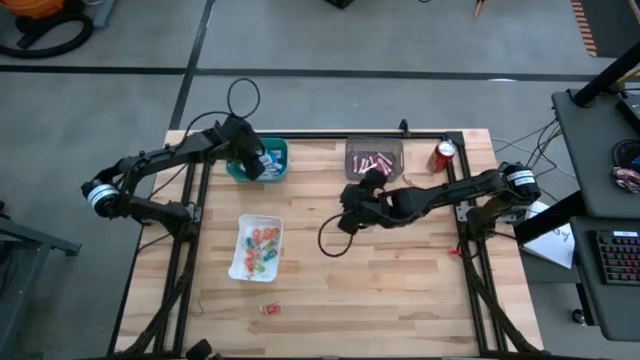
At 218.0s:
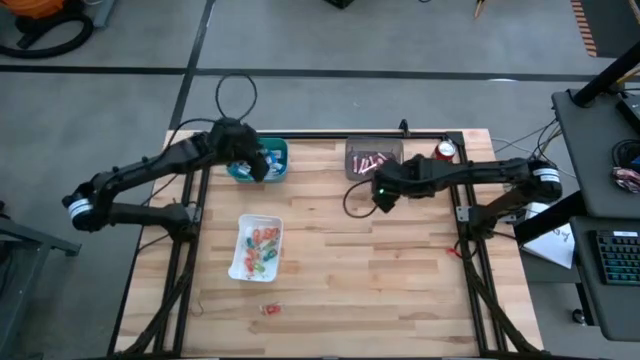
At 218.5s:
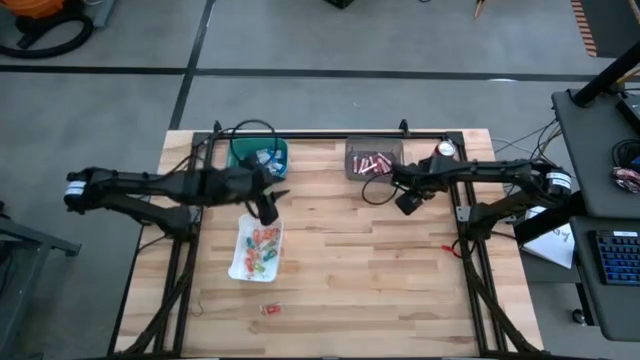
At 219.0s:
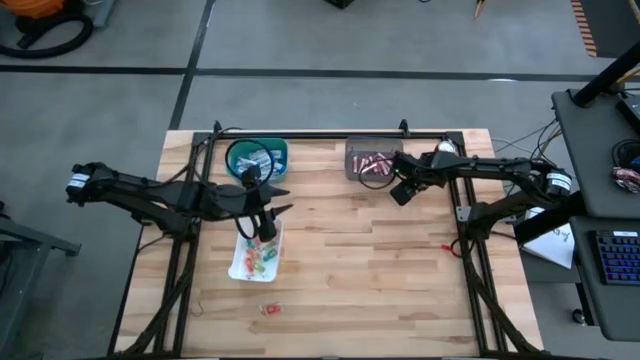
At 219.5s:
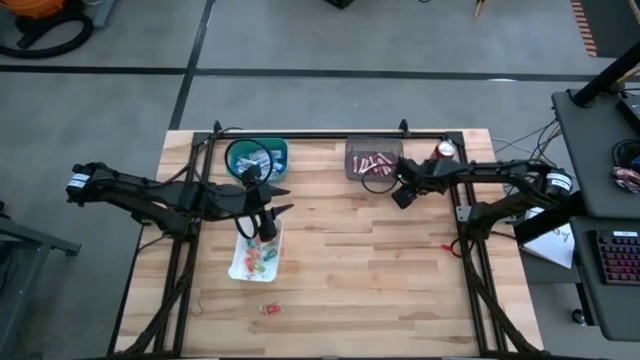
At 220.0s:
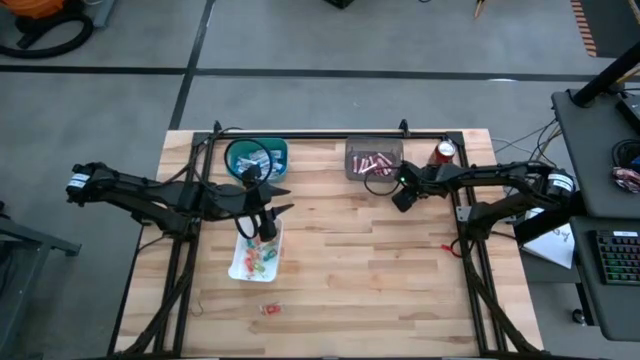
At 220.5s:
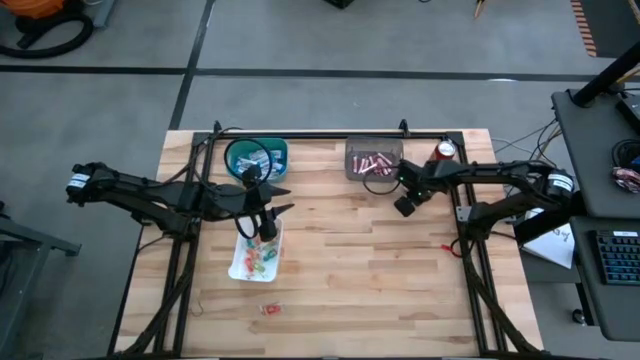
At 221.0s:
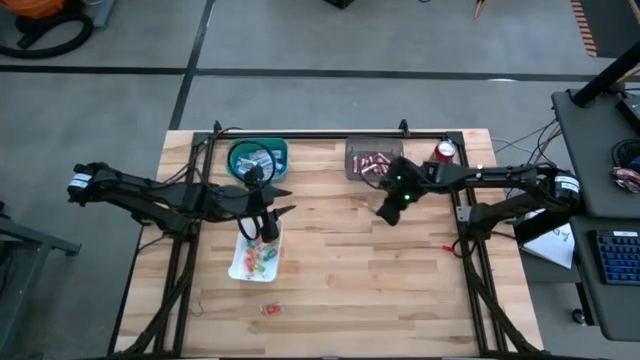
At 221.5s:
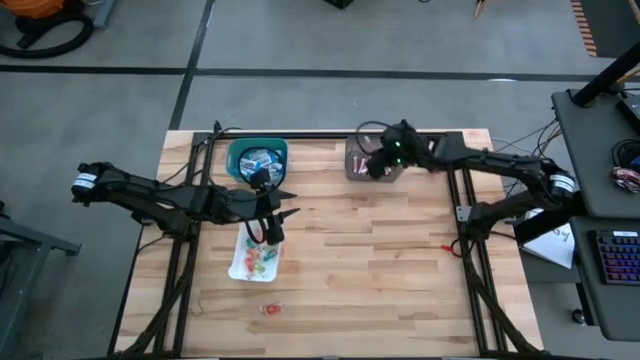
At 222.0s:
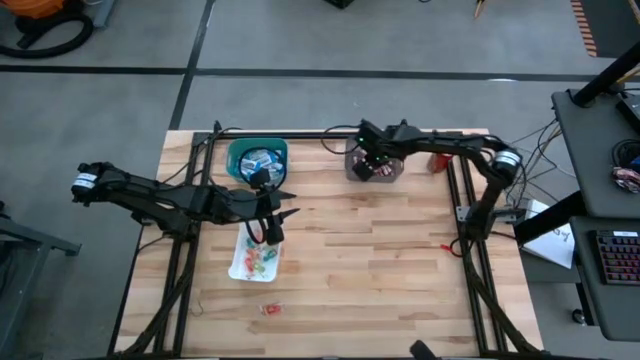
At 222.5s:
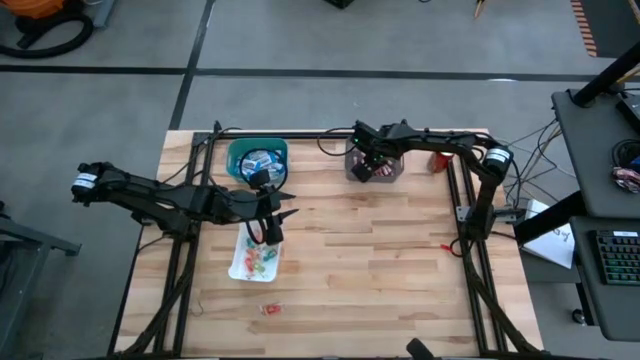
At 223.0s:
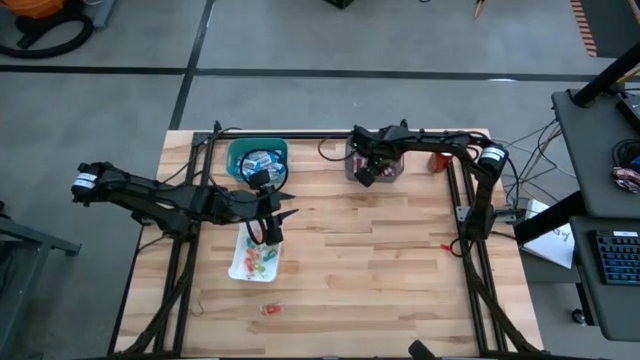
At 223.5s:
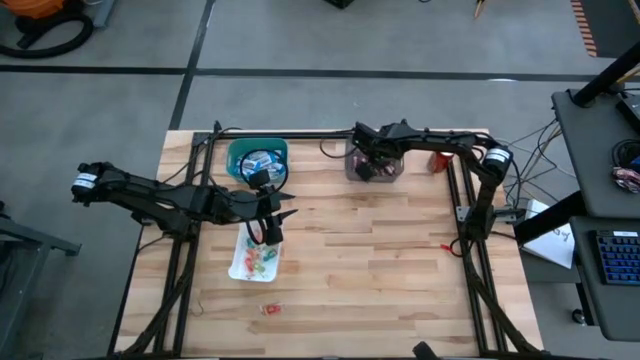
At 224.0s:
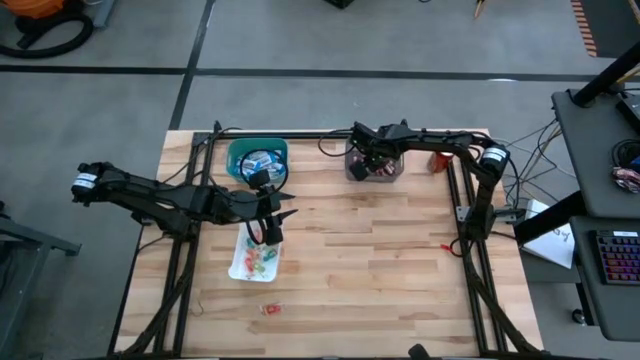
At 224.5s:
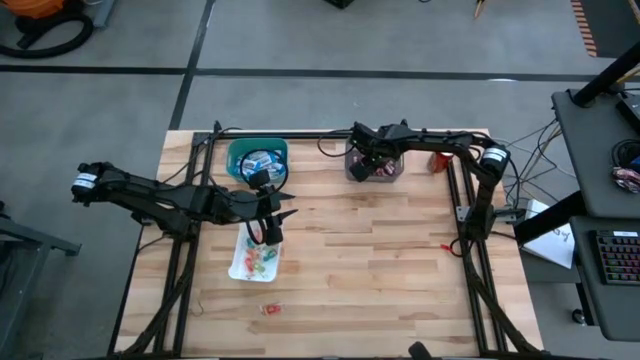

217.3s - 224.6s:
Task: Sort candy
Put the transparent candy rolls into the black bin

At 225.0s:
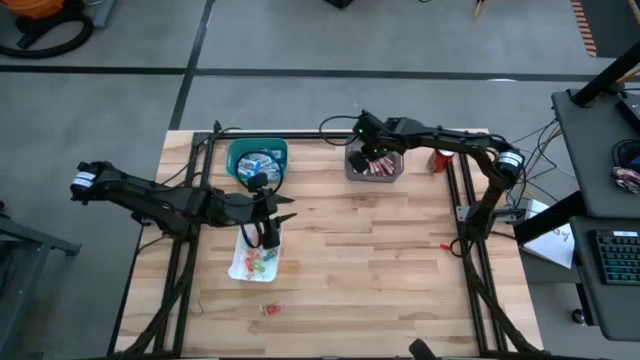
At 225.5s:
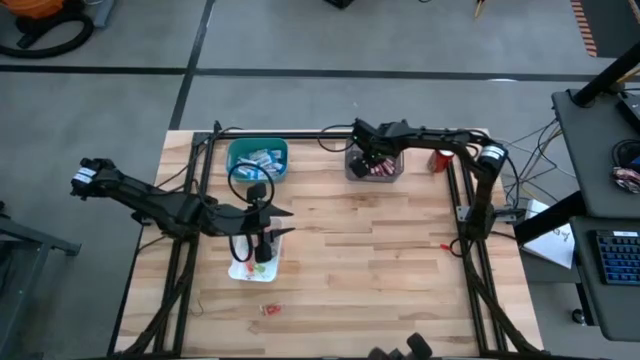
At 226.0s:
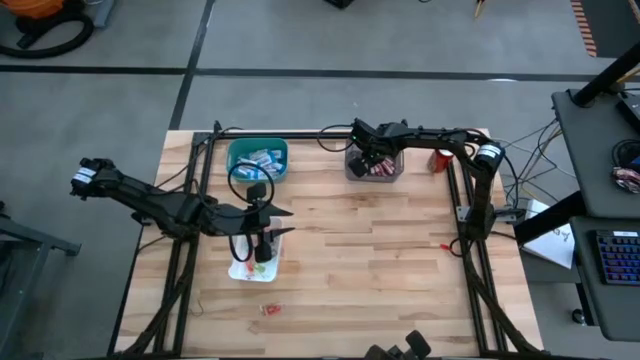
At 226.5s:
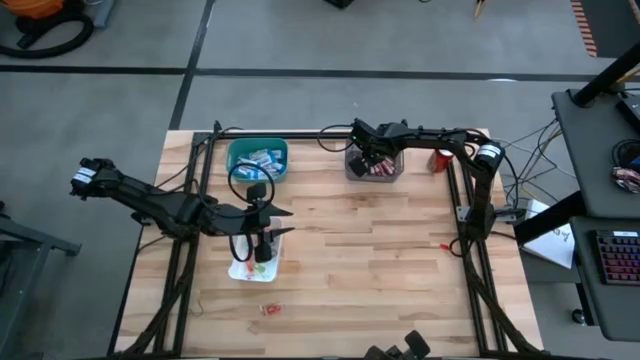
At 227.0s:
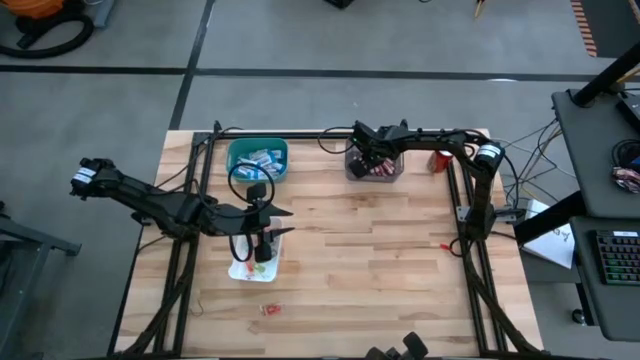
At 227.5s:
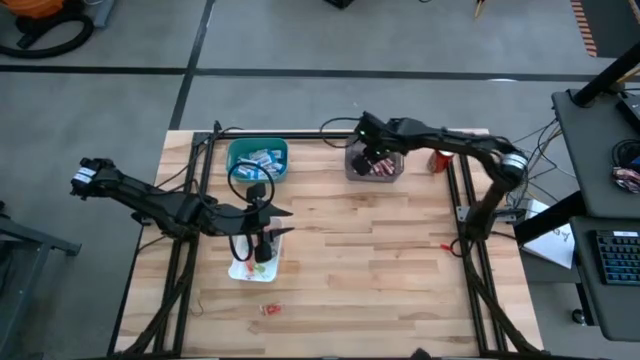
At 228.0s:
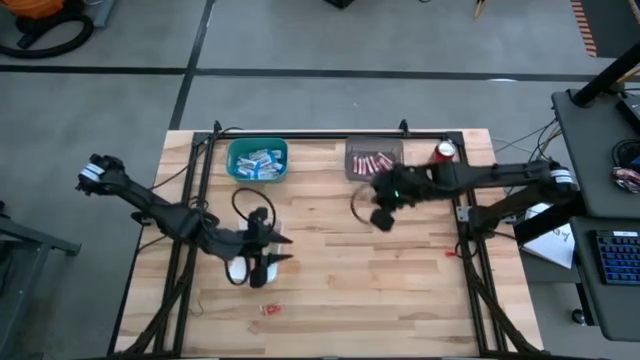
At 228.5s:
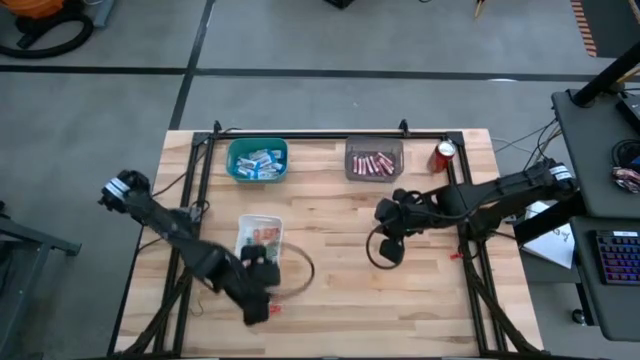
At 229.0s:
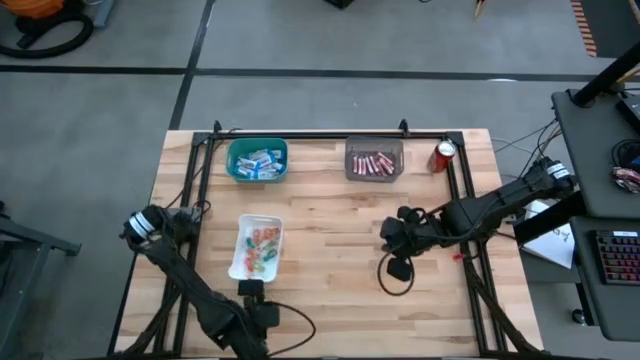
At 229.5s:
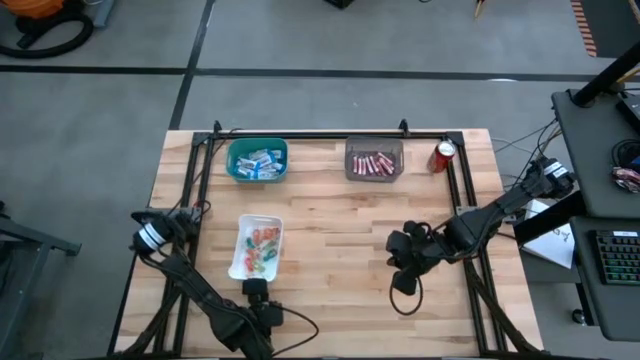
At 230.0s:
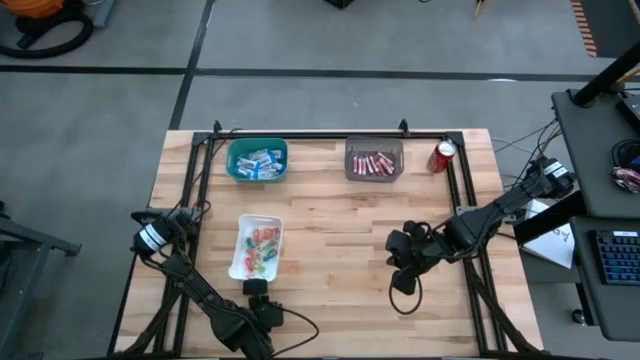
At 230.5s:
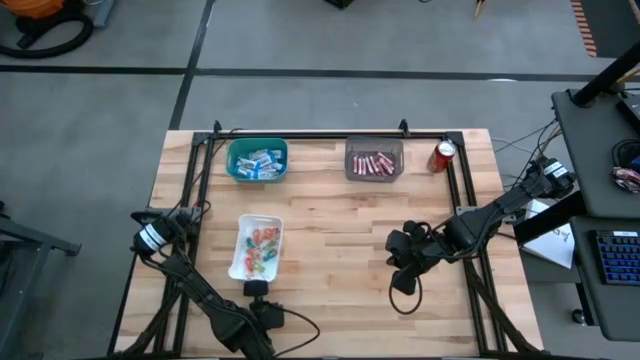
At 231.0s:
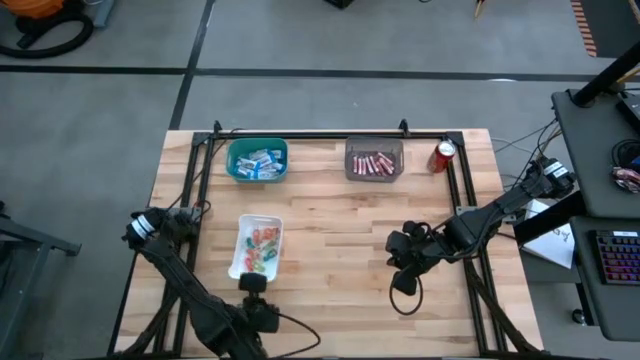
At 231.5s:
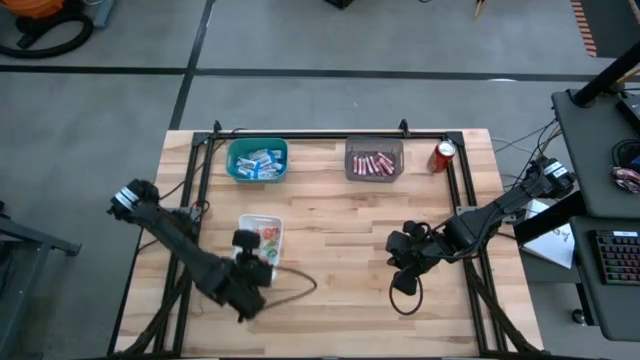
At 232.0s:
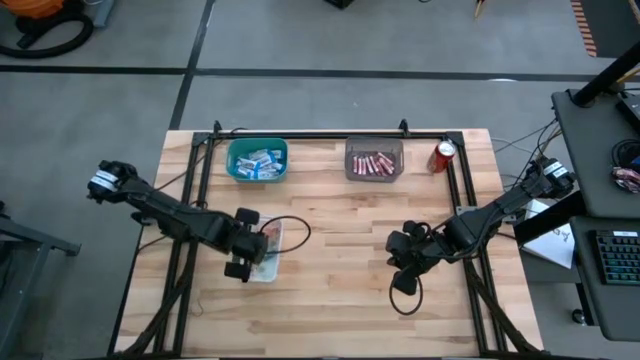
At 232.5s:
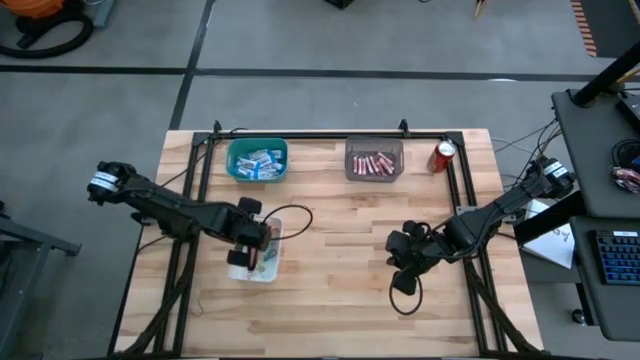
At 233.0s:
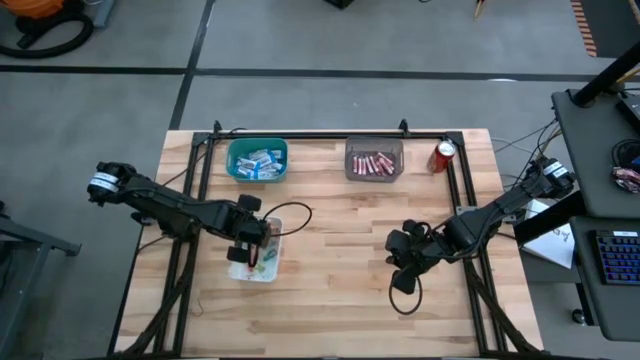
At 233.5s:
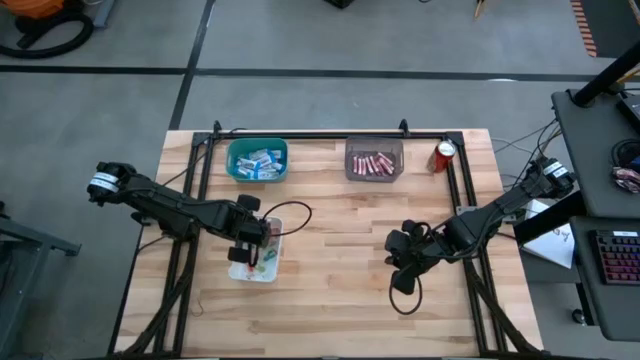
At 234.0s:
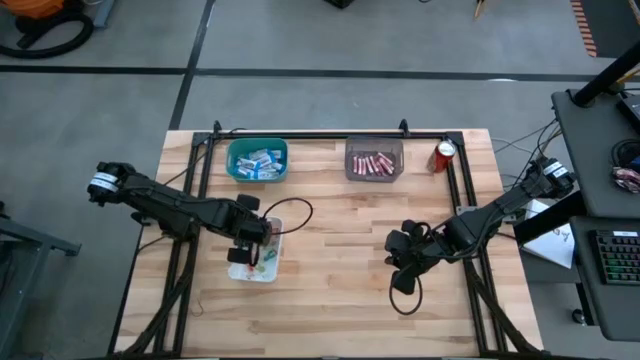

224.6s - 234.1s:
Put the orange gummy candy into the white bin

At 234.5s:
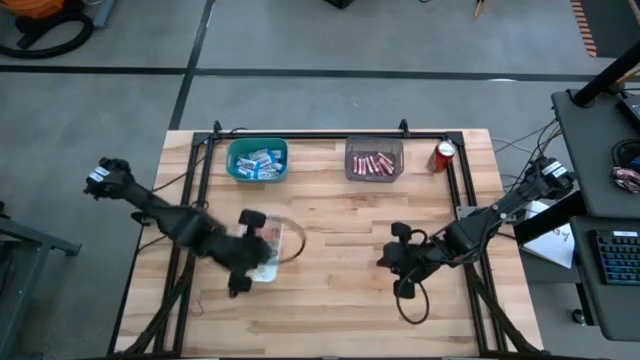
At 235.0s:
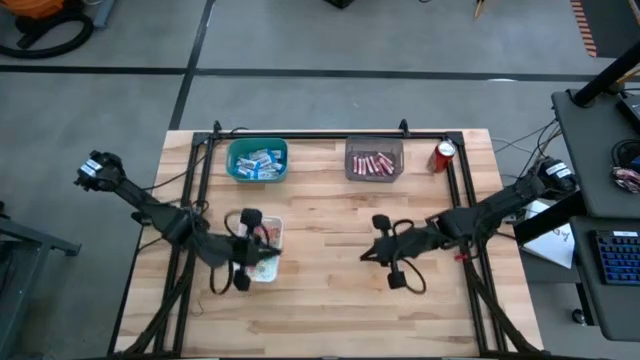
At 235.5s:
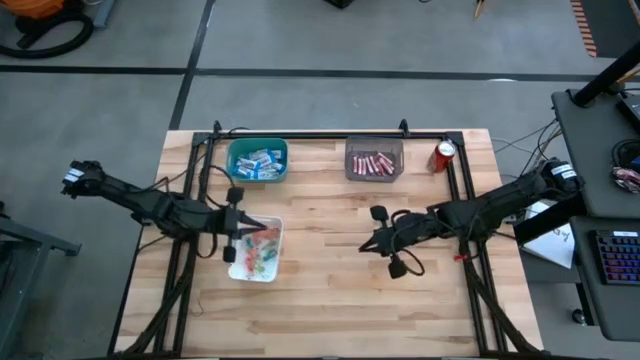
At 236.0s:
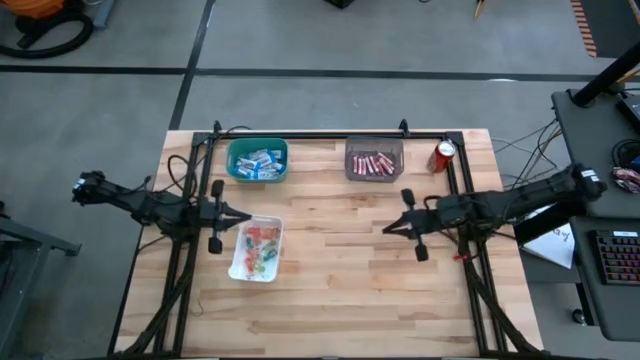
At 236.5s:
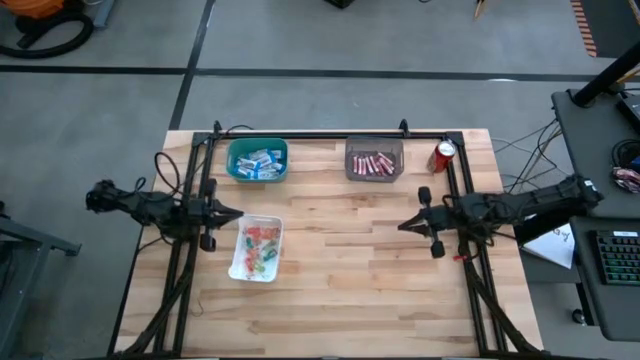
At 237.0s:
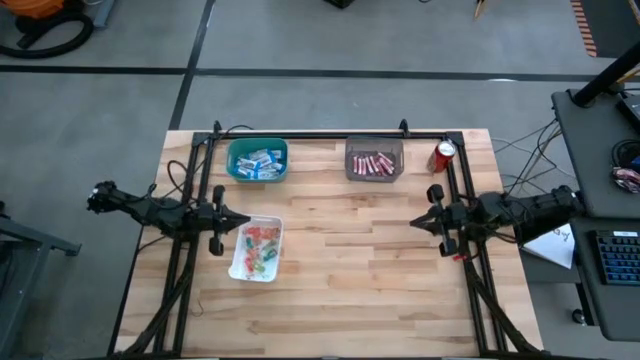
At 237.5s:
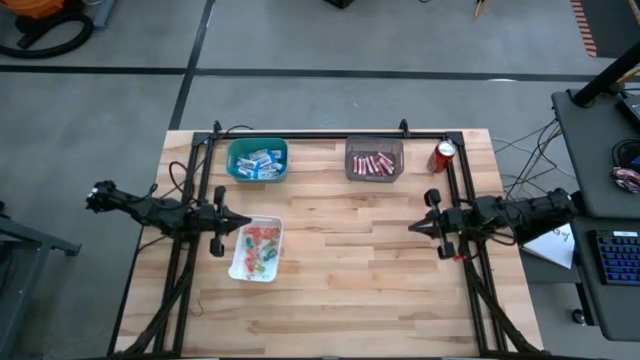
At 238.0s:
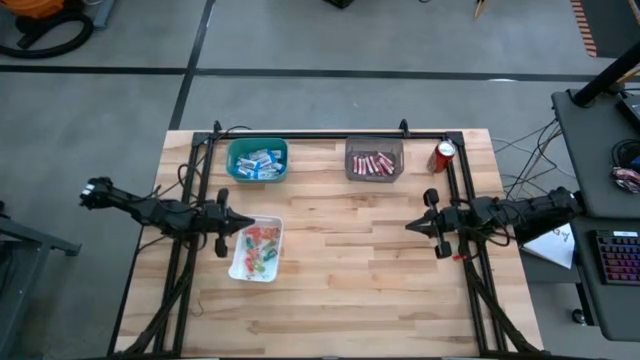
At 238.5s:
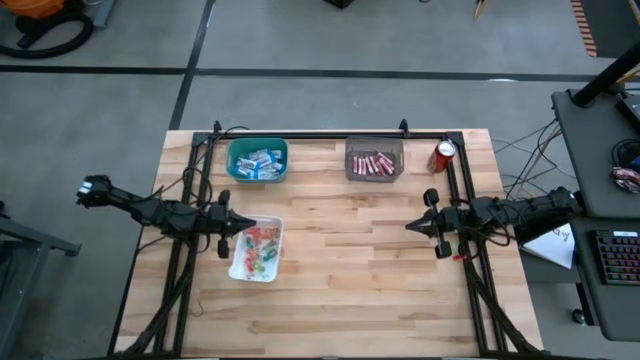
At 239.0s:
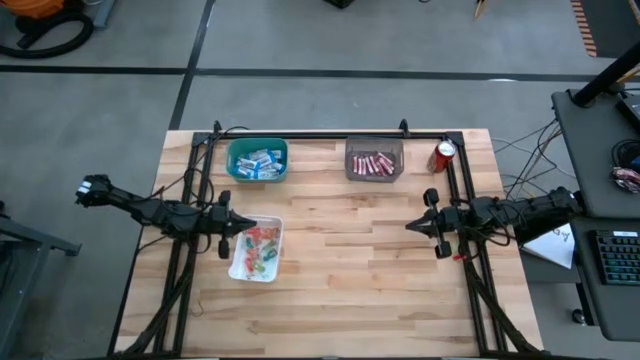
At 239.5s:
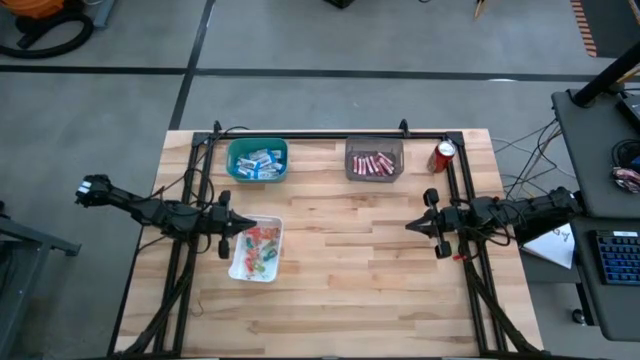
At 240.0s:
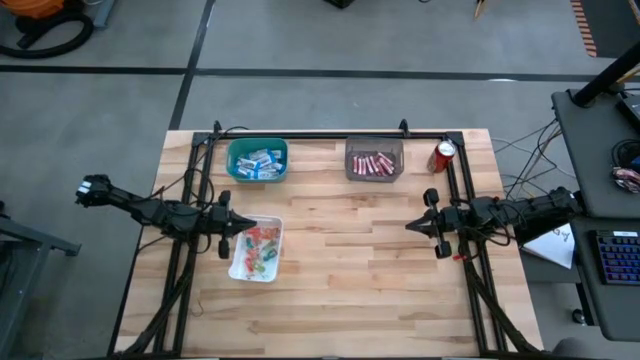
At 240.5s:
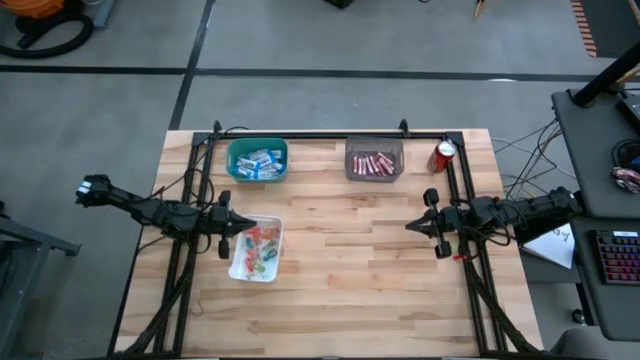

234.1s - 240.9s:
Return to Home Position
